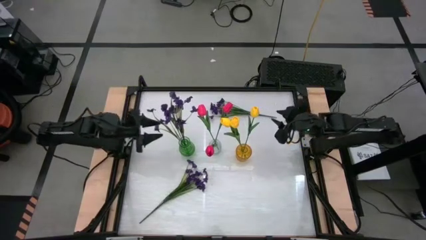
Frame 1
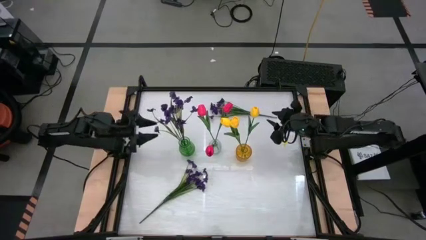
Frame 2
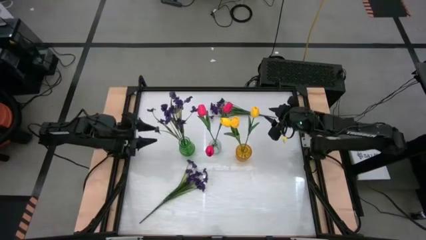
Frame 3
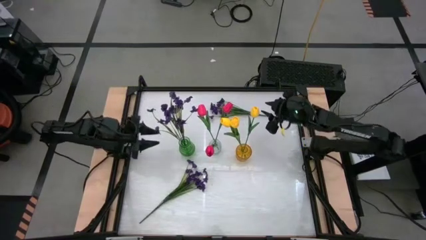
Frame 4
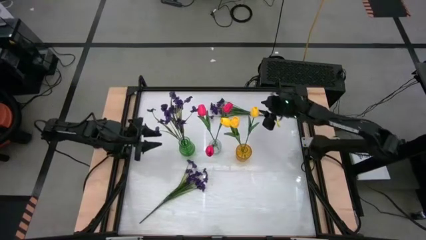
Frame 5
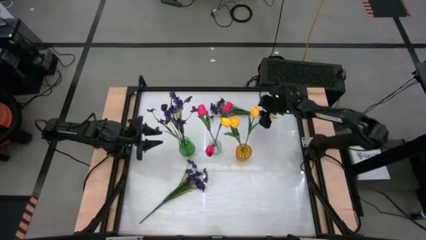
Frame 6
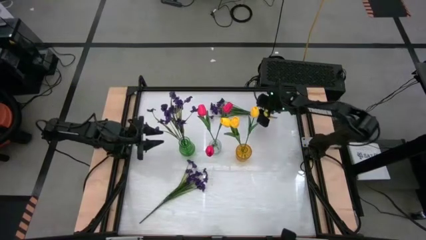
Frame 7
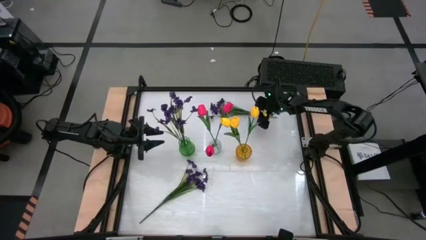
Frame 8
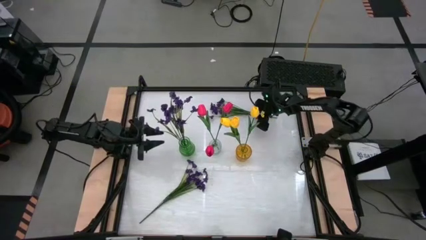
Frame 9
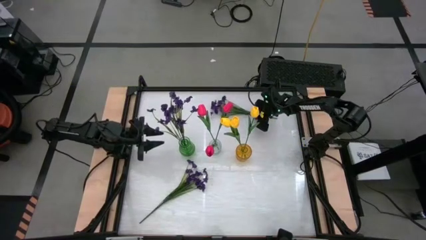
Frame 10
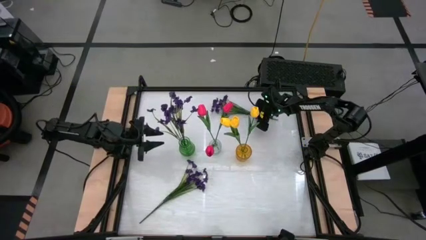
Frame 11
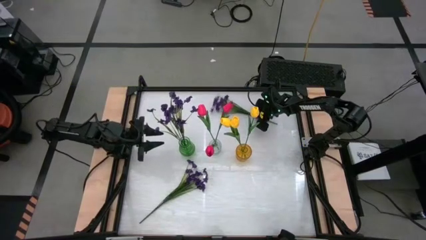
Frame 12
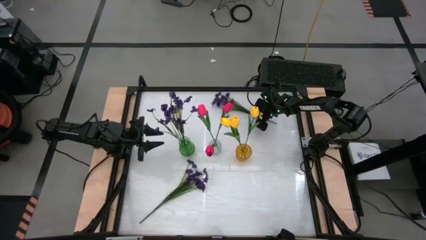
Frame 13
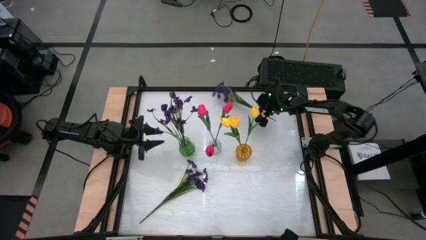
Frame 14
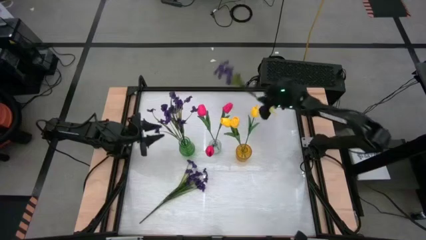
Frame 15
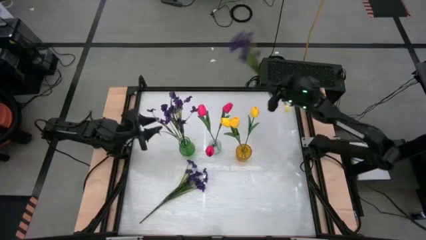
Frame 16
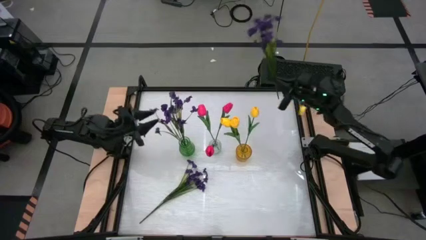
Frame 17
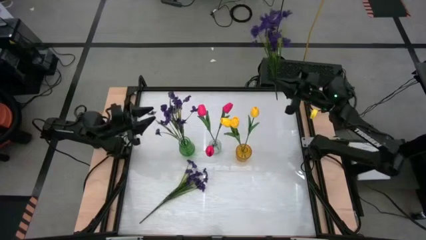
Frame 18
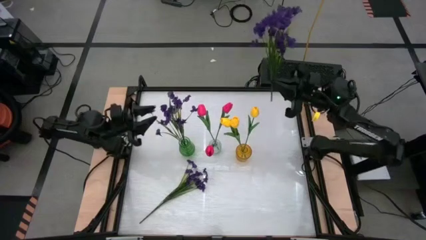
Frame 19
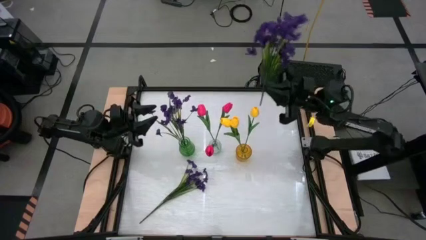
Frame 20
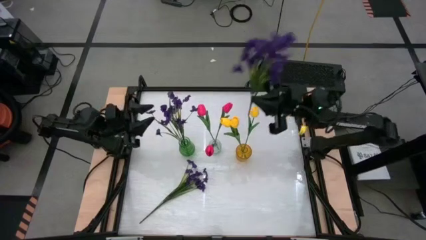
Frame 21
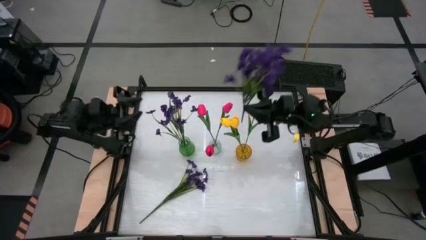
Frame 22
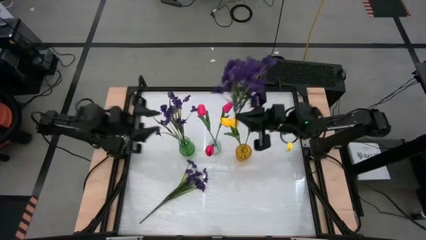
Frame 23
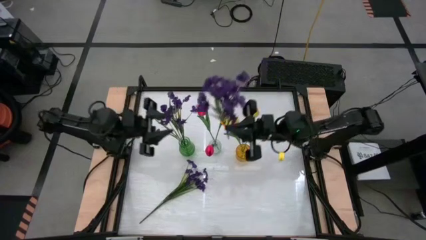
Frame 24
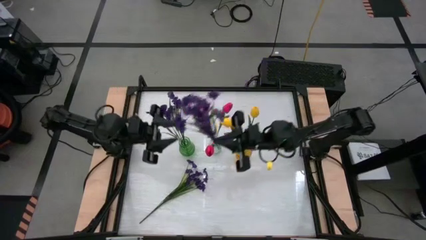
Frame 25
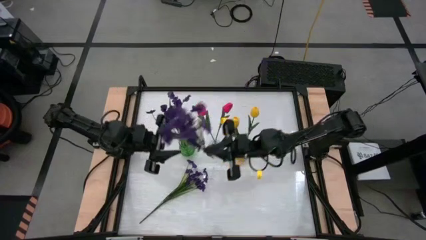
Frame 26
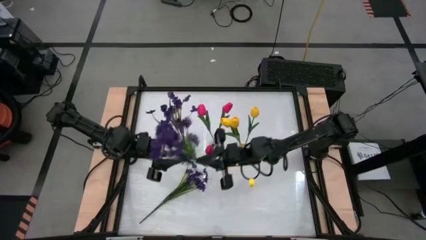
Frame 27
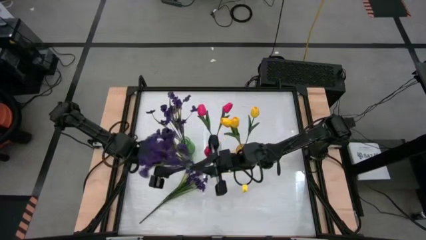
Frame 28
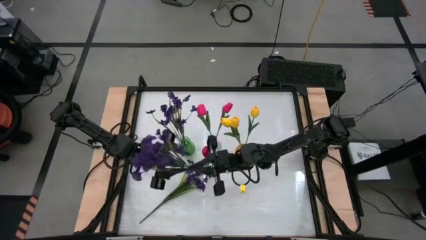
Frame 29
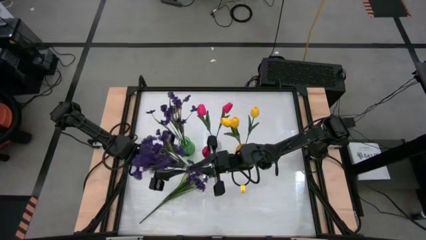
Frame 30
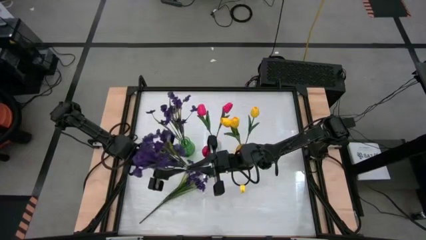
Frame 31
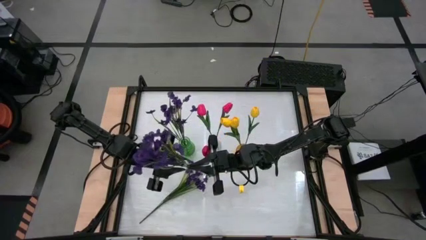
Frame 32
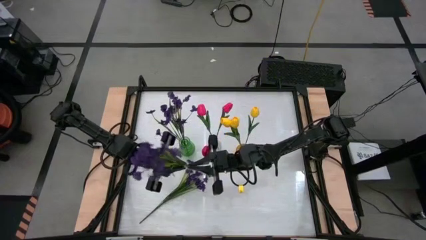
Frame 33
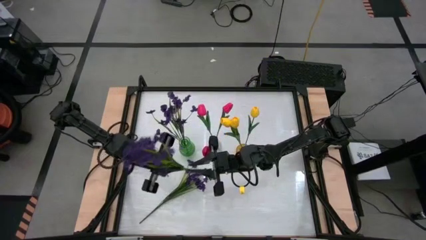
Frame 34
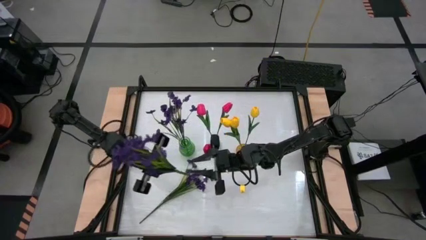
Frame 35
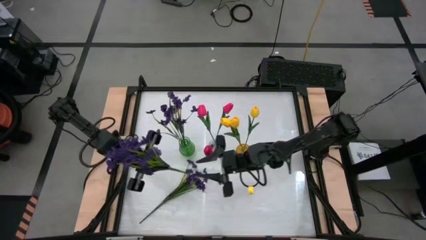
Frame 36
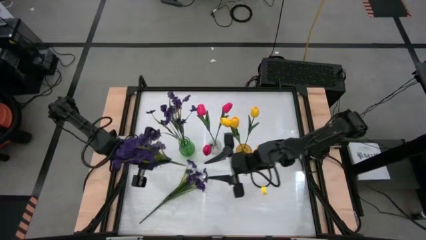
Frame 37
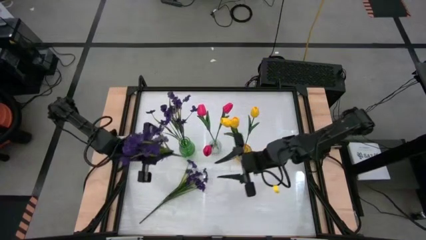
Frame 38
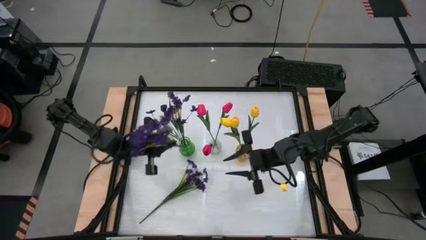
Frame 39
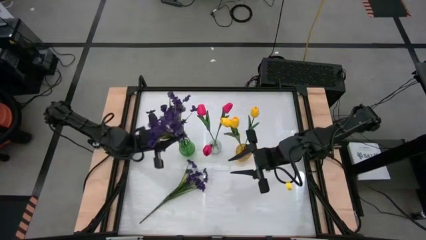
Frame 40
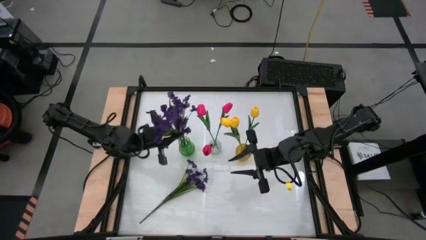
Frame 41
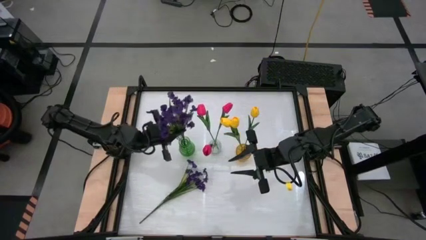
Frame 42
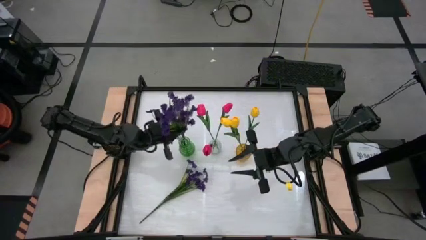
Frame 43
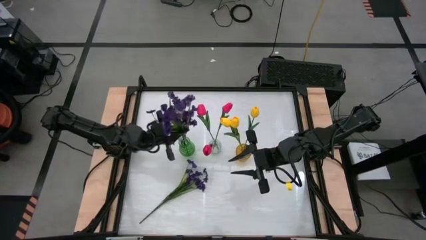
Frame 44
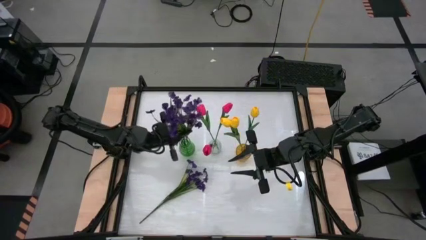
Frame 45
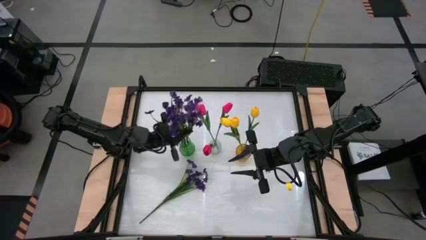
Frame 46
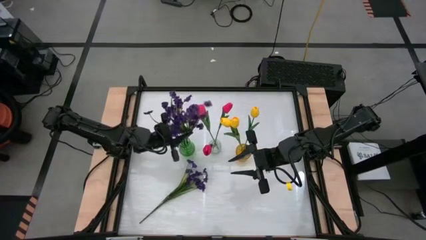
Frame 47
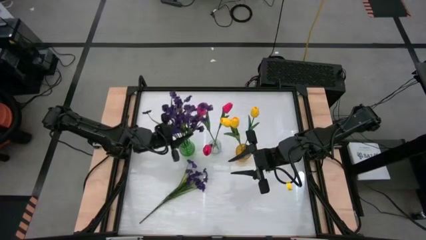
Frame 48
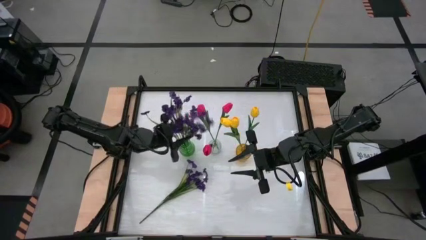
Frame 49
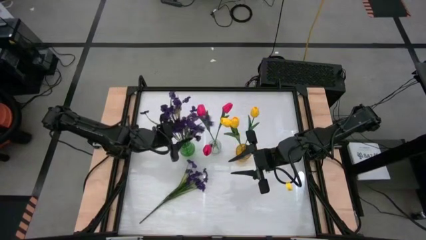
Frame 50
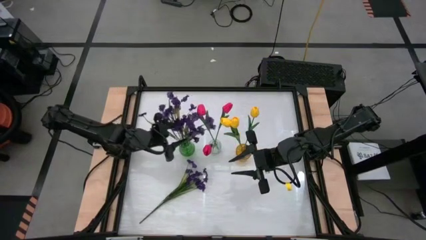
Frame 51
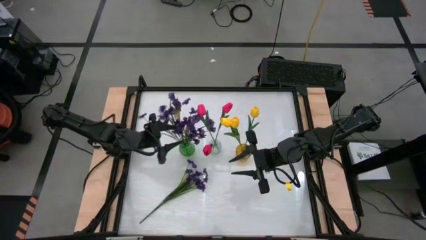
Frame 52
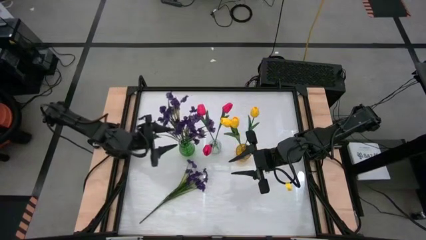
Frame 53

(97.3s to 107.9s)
Task: Sort flowers into vase by color
Put the top purple flowers into the green vase

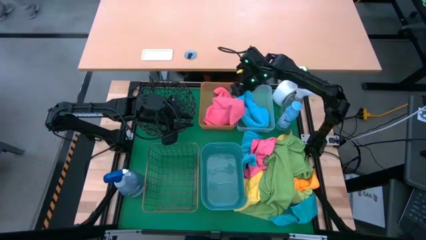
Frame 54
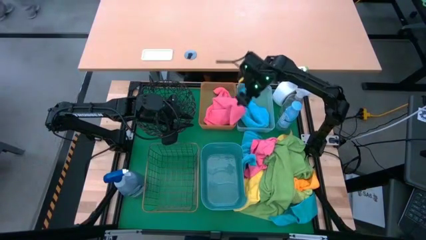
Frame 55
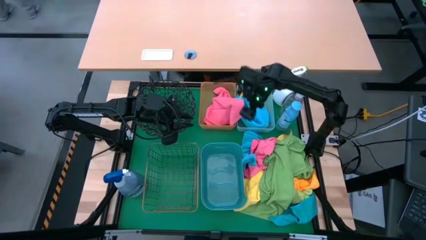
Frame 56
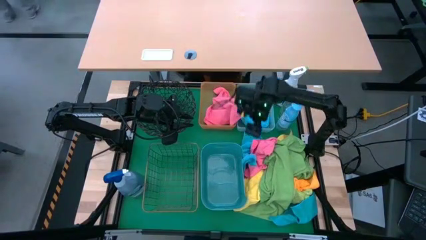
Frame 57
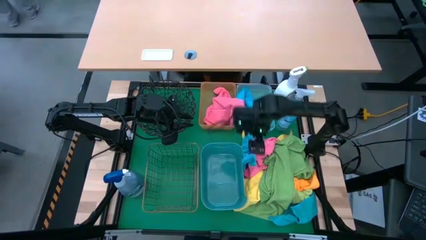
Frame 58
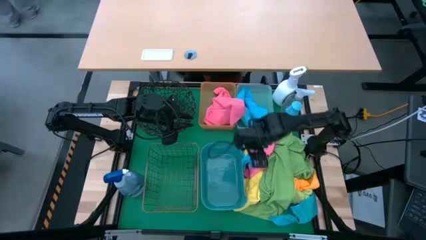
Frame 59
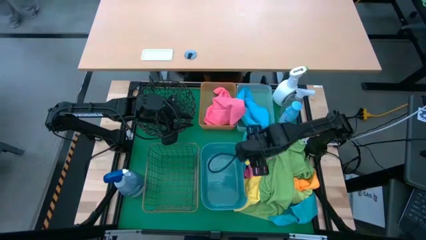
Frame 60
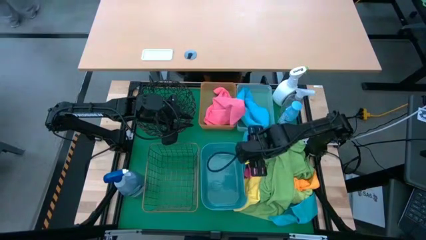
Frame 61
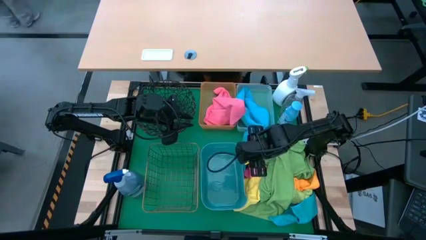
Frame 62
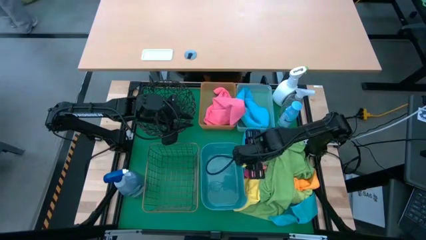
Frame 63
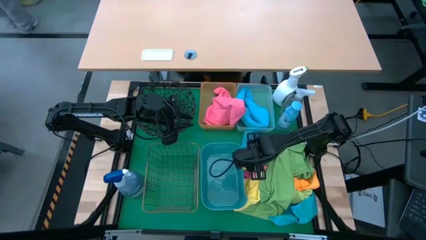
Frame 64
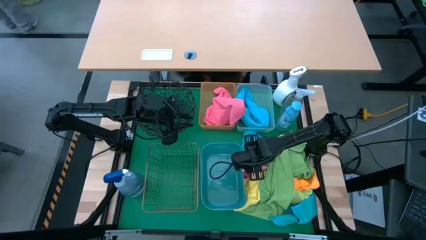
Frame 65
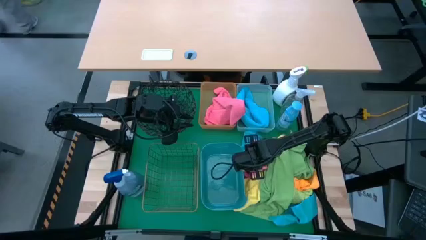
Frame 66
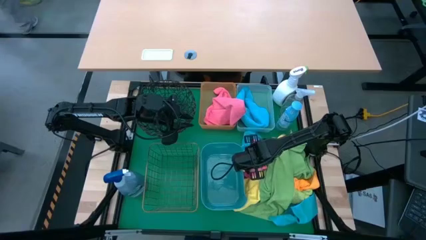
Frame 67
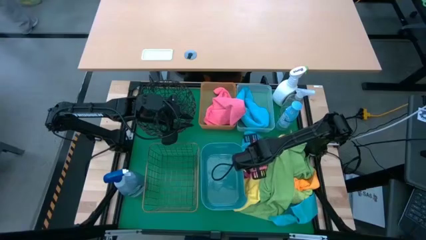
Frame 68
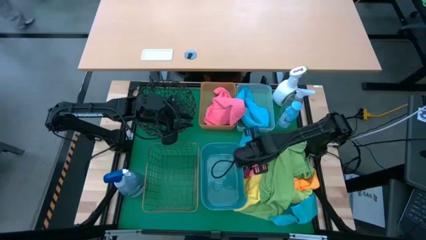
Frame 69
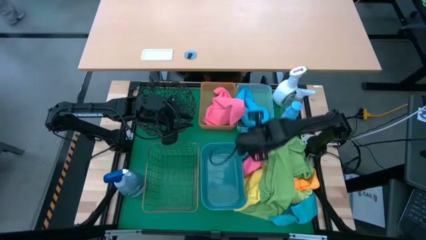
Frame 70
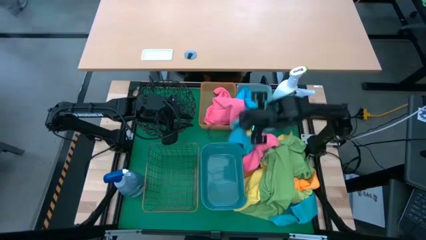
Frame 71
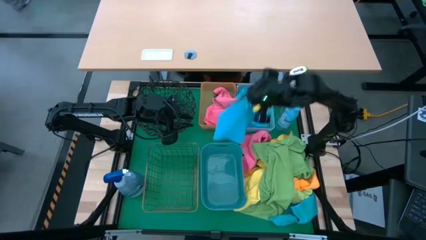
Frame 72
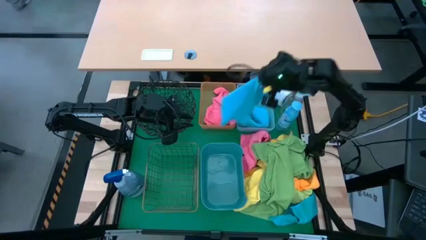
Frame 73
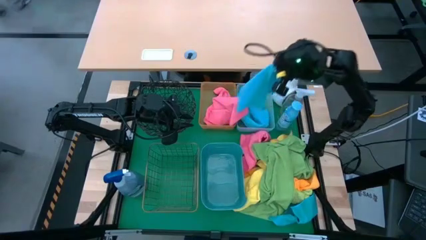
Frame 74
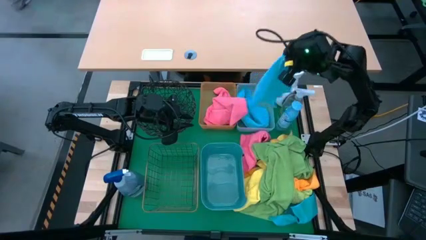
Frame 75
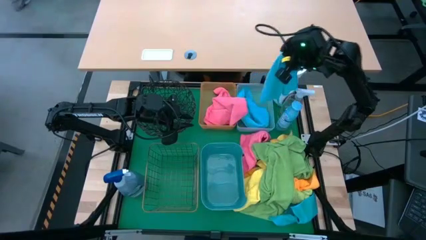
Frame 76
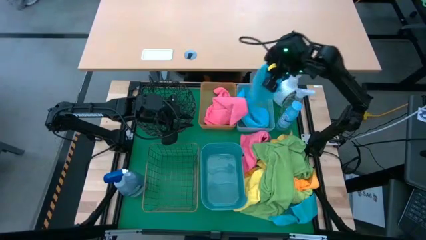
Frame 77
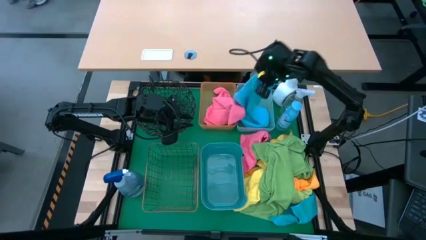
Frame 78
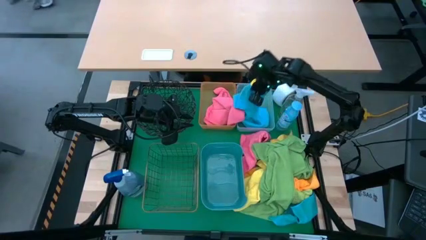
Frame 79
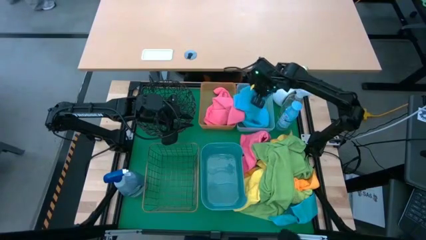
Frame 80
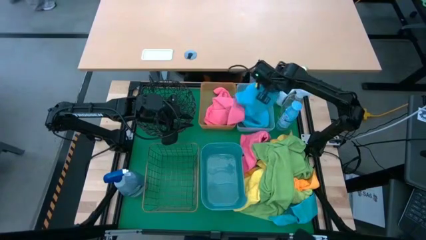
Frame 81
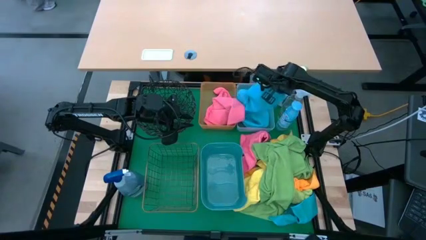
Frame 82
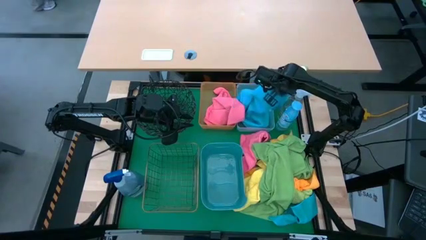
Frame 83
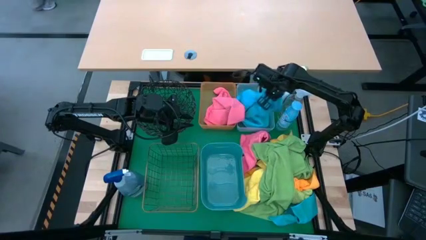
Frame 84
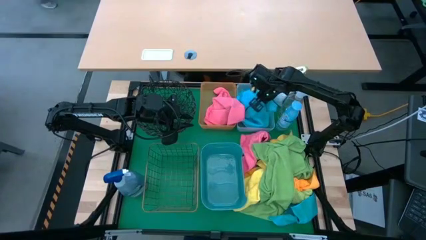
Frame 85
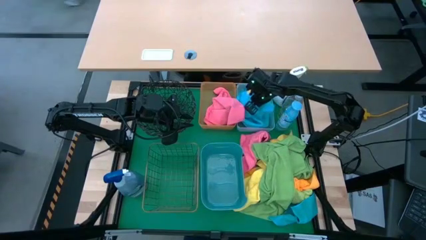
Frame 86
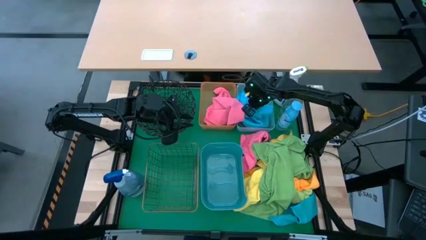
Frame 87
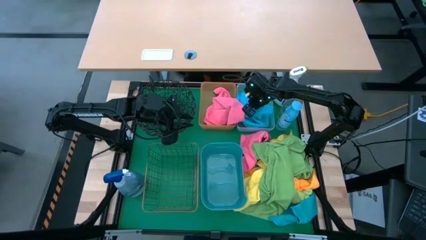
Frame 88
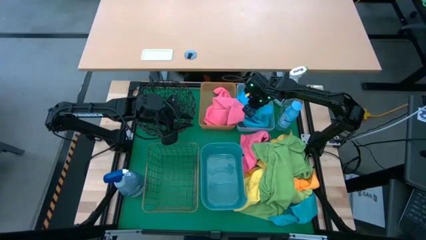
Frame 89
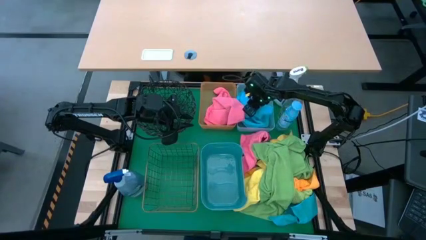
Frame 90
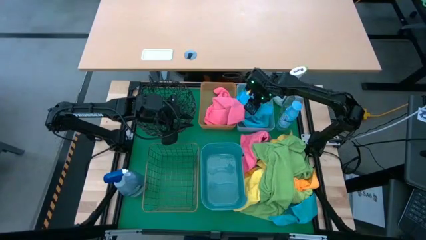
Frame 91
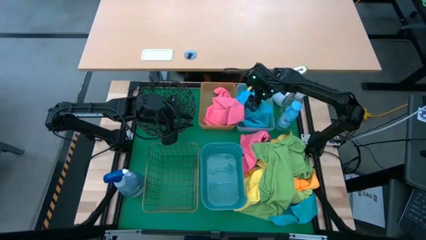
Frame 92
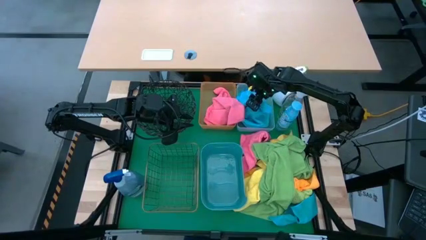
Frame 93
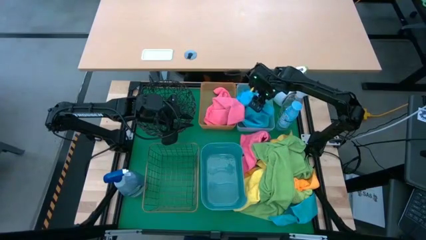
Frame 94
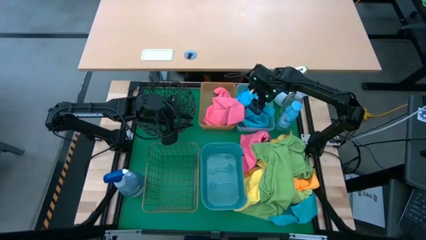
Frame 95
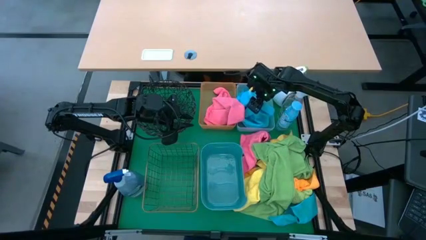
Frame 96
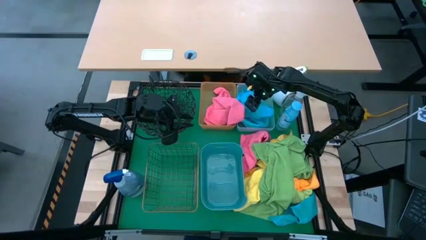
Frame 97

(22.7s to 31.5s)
Task: Sort microfiber towel by color & place in baskets
Put the blue towel into the transparent bin
